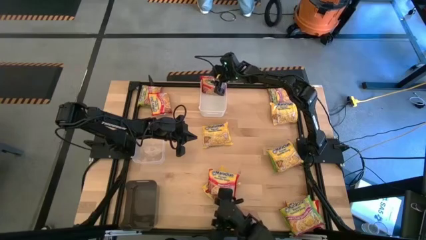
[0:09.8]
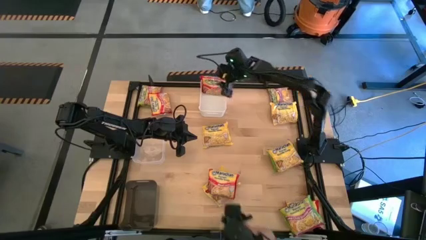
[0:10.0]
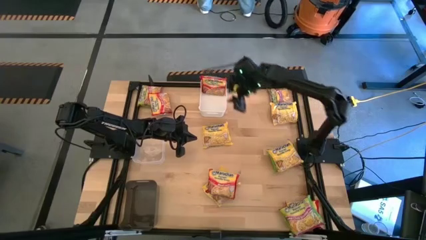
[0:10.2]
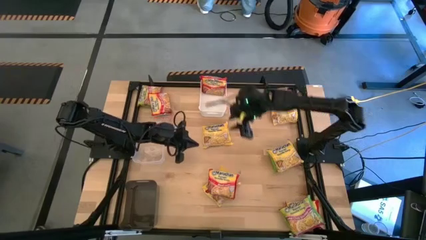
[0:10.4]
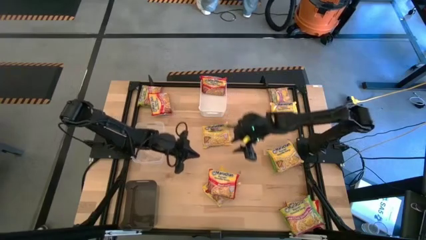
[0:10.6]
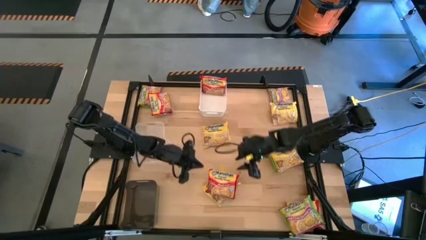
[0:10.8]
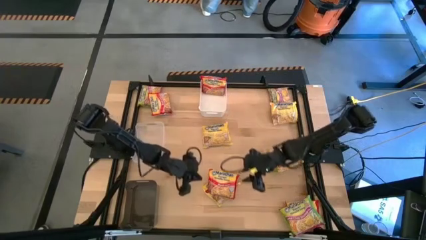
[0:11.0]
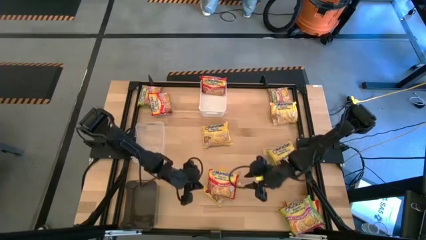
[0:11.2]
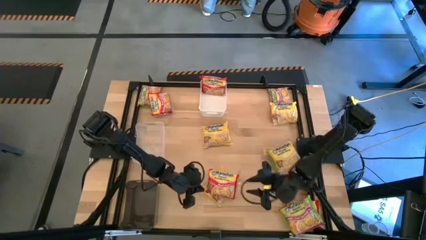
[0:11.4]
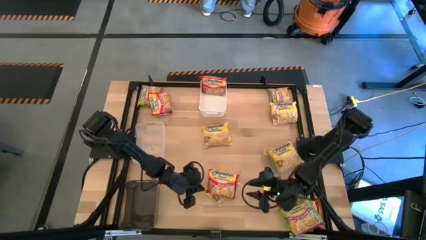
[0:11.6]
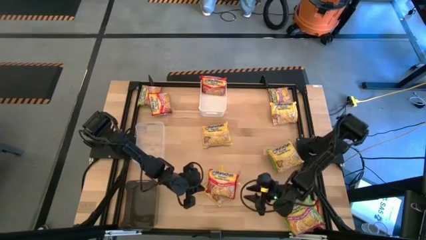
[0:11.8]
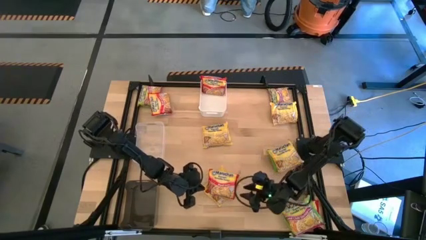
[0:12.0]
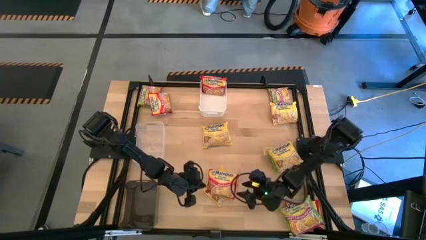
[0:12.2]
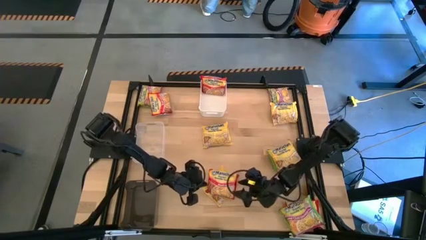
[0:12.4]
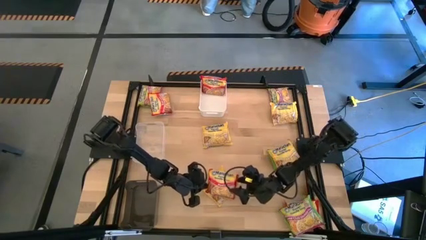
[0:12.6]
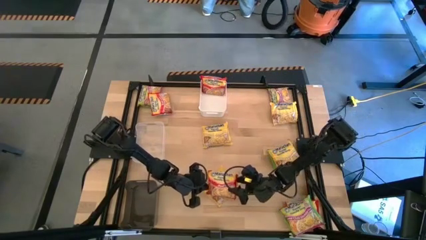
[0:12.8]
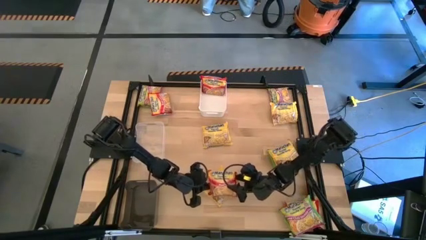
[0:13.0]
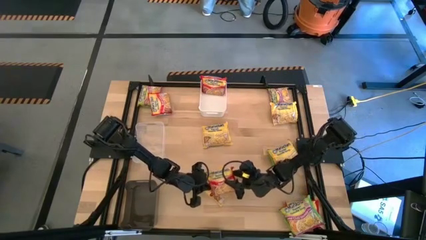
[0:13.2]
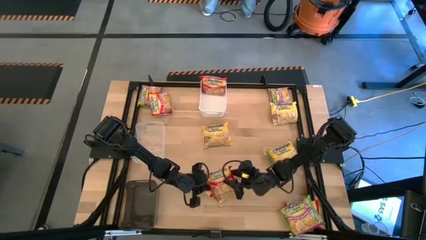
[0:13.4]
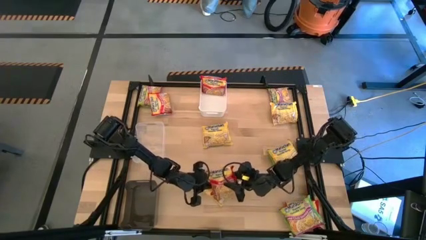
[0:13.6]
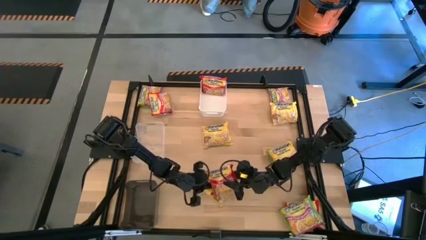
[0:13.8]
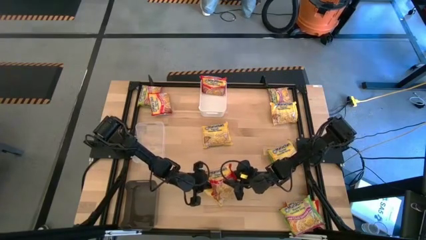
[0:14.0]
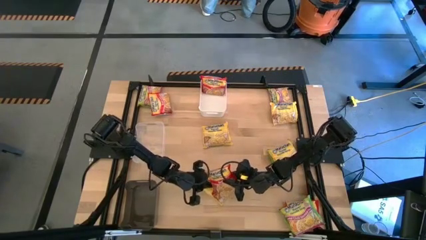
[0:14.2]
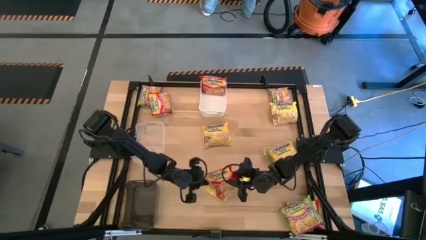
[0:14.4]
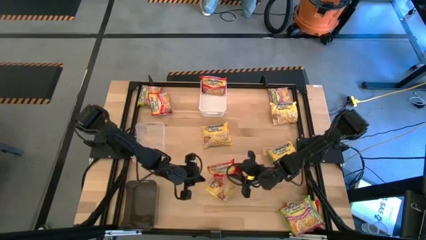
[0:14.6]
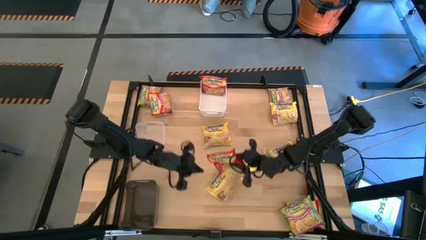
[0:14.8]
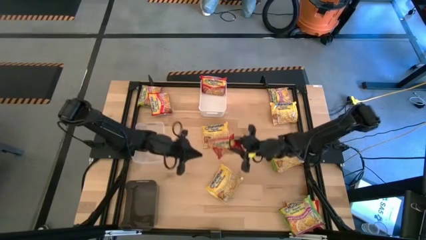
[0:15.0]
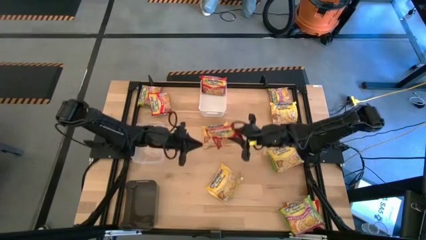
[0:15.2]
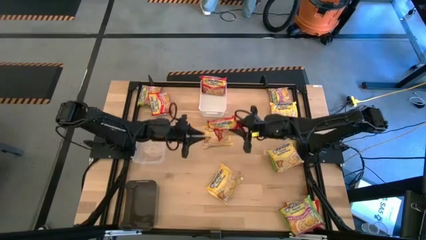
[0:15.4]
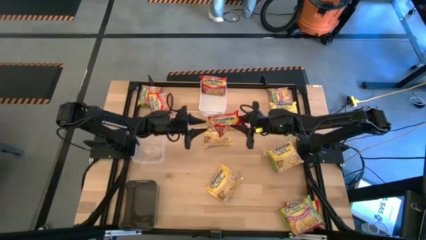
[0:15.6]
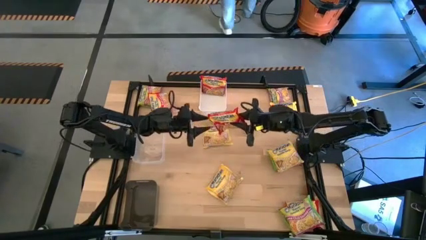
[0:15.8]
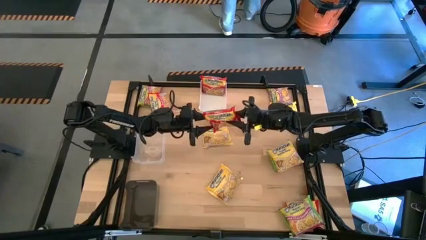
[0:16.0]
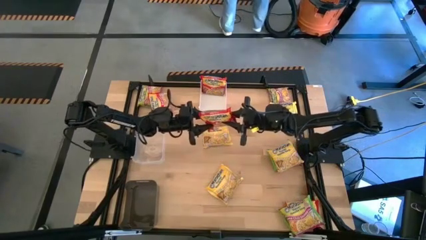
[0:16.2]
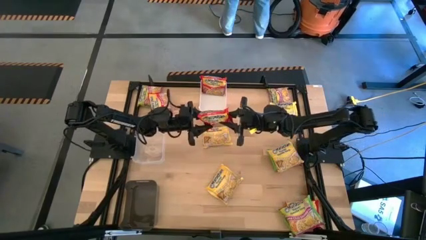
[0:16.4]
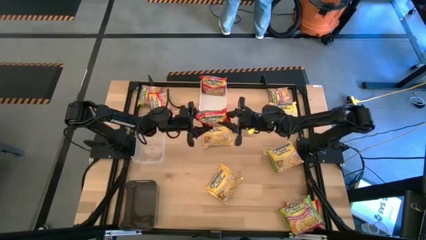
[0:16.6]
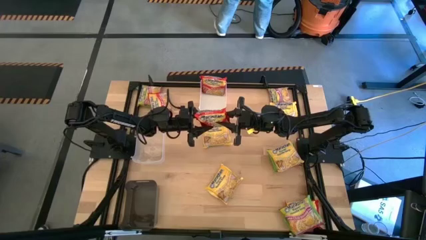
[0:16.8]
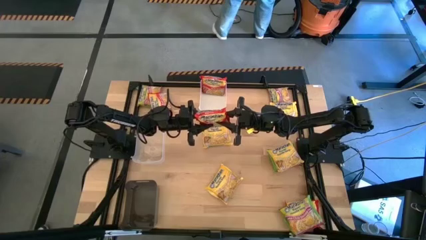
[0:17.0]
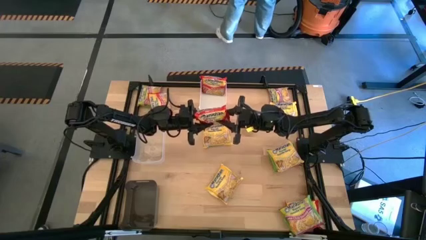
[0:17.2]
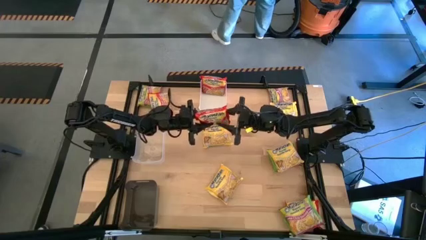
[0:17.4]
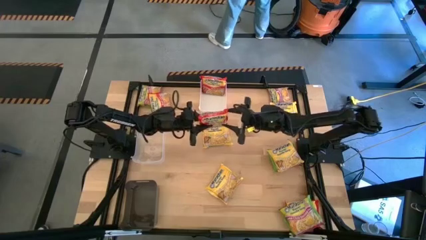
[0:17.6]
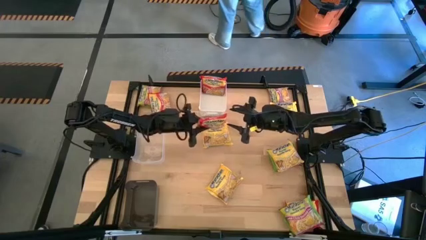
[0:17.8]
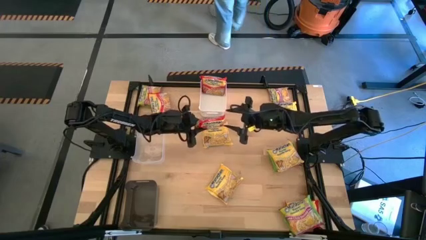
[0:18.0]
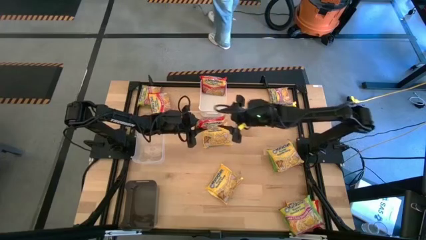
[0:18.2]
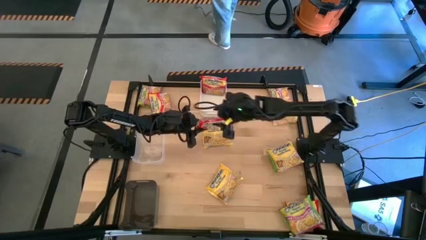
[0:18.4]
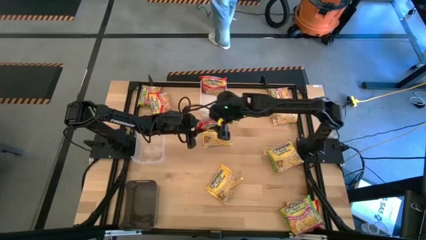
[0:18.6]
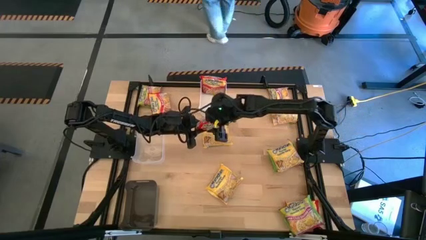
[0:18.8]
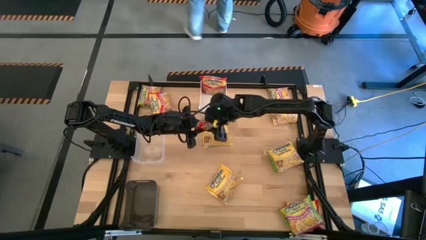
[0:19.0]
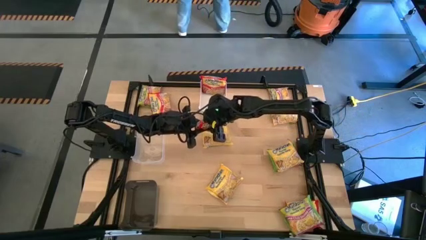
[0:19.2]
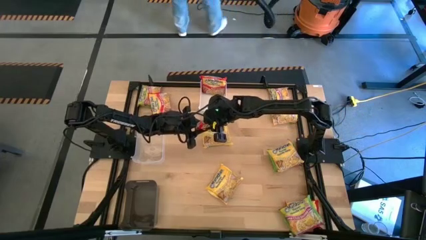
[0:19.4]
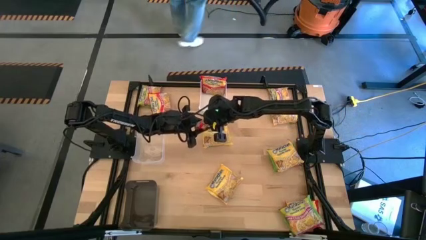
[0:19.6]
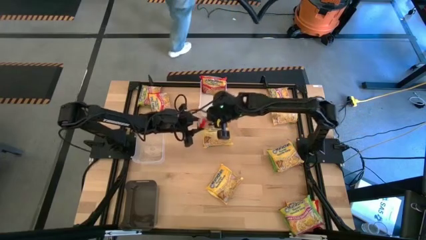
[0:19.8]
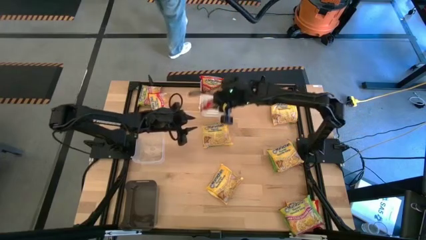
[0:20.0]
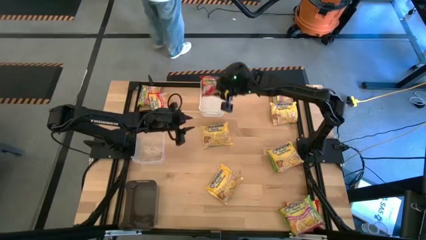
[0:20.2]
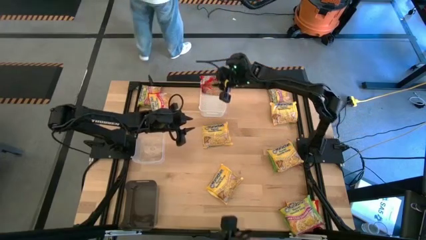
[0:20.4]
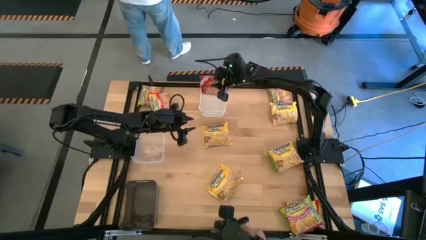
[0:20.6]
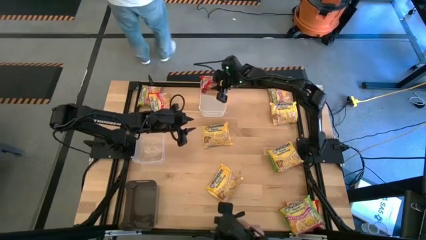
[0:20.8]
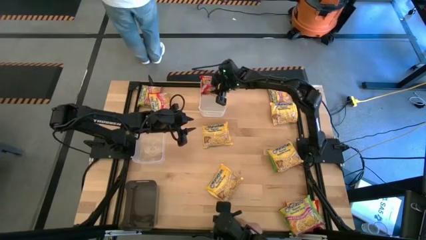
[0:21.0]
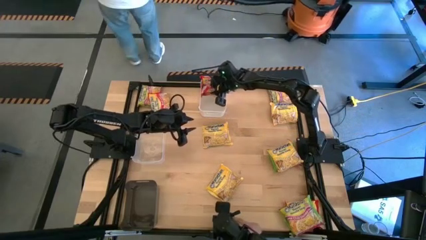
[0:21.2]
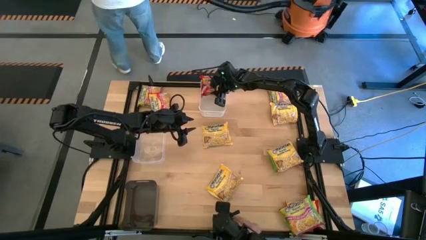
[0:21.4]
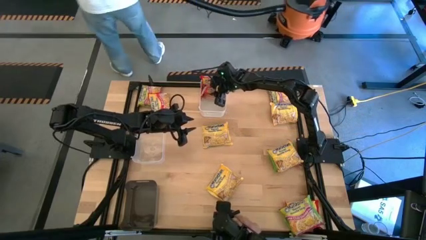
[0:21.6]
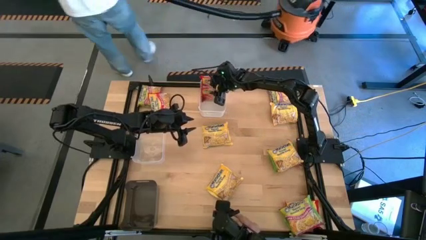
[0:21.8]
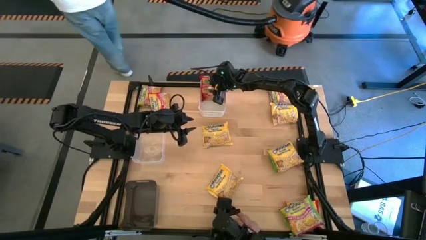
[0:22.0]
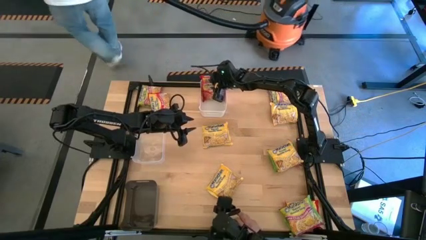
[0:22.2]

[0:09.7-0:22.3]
Task: Sort Maruchan noodles
Put the red noodle pack into the white bin

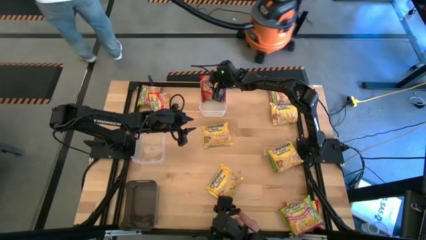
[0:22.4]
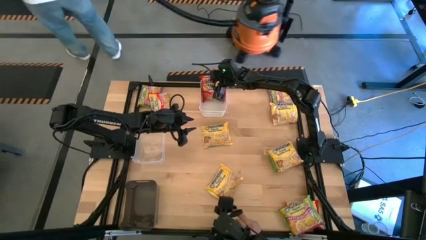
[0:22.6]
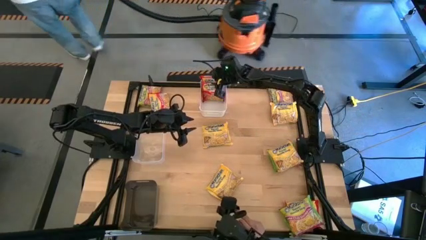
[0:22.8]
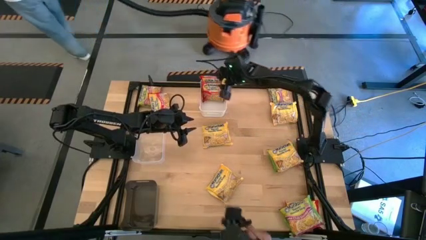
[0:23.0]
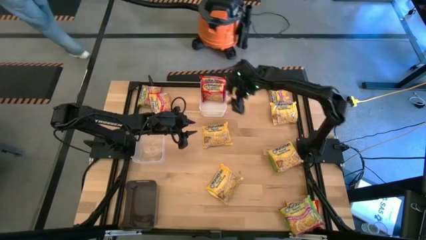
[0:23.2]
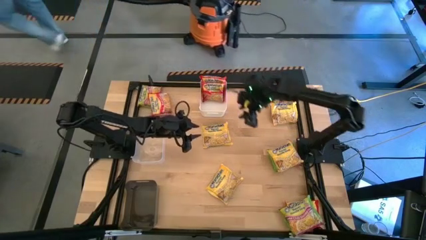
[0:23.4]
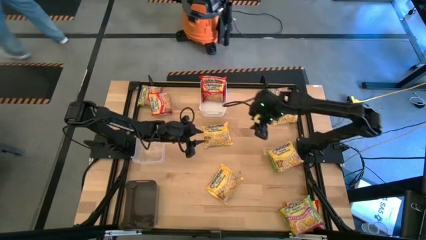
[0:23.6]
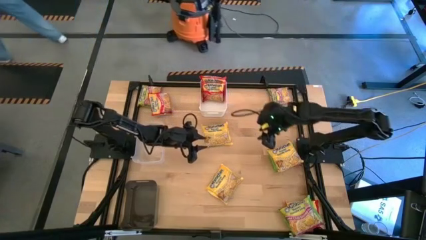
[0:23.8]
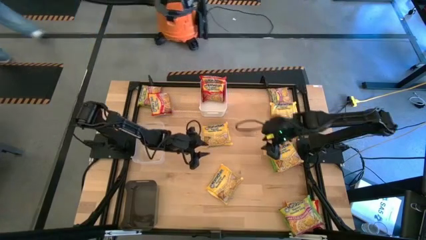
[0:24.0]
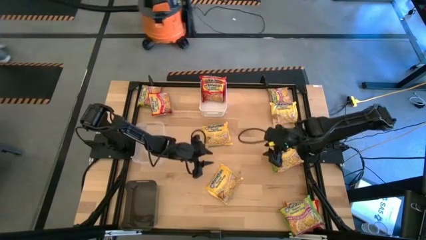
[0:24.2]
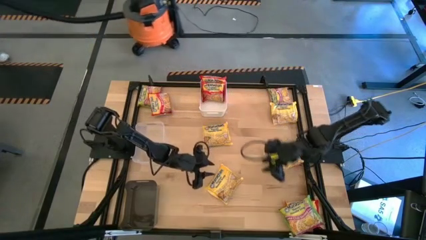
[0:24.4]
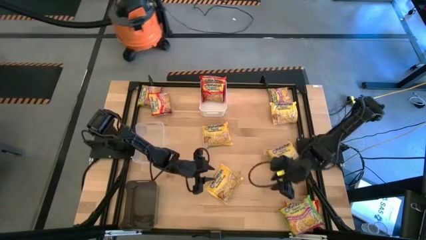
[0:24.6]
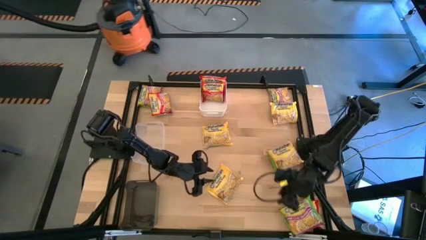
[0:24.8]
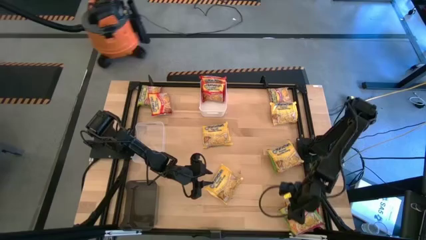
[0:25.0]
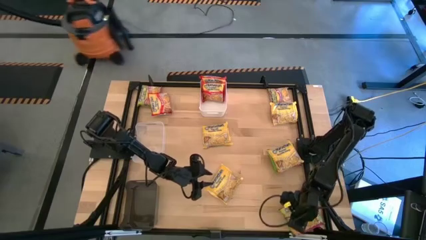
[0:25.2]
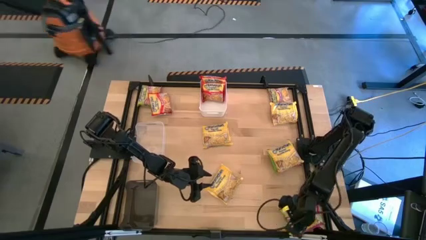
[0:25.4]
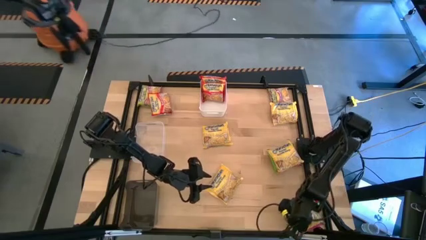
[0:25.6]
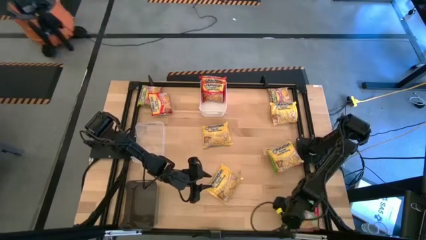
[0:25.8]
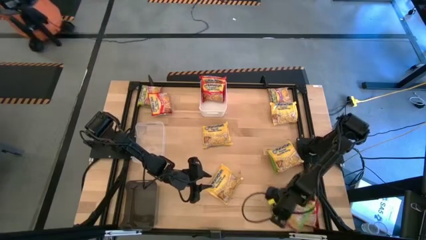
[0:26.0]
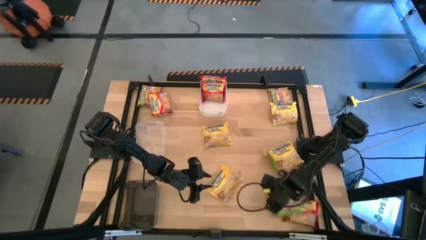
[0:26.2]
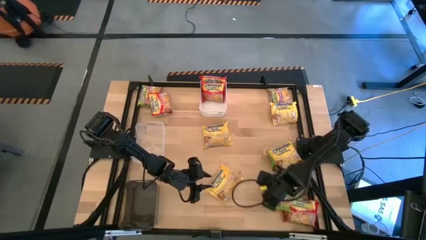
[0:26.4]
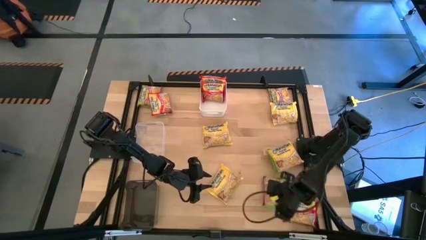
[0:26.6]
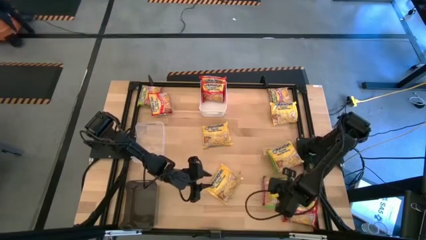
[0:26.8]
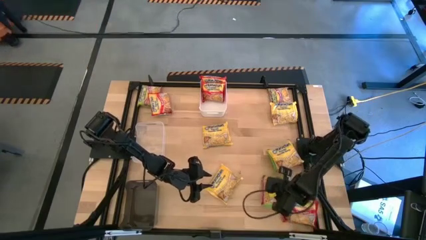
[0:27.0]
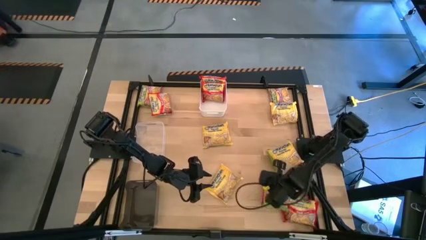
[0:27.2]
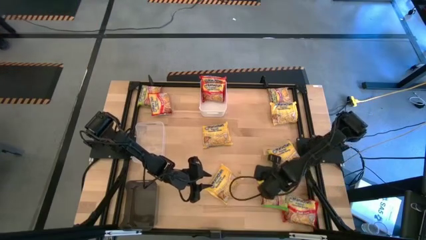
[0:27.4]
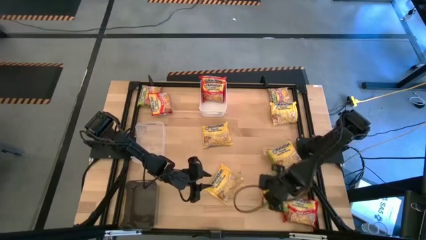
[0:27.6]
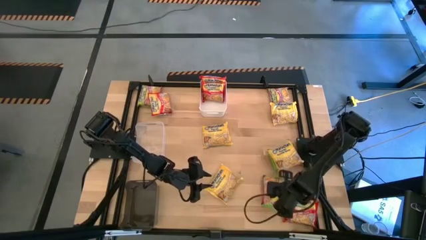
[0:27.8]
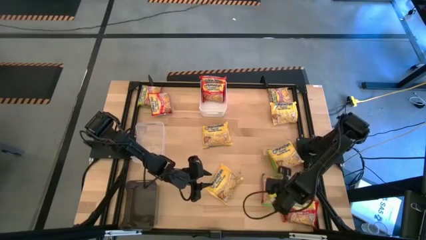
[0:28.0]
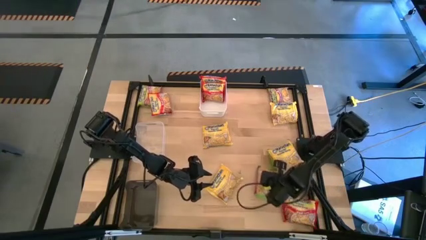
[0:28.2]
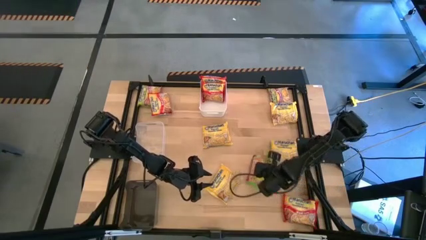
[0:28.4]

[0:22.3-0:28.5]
Move the green noodle pack to the middle right of the table
